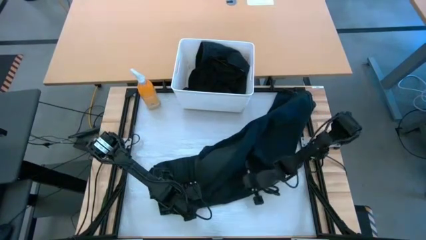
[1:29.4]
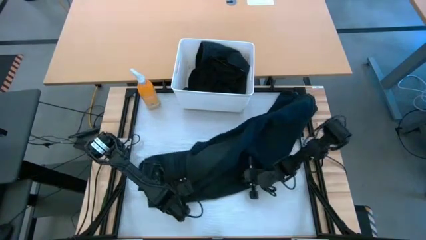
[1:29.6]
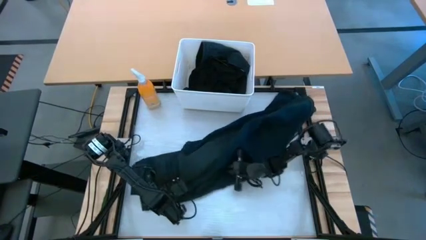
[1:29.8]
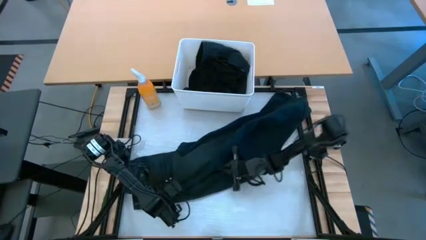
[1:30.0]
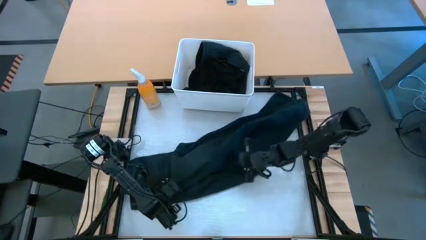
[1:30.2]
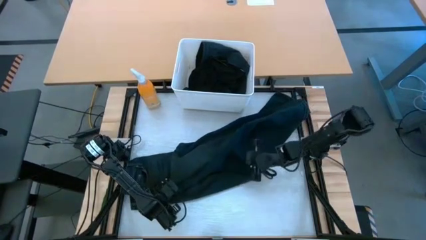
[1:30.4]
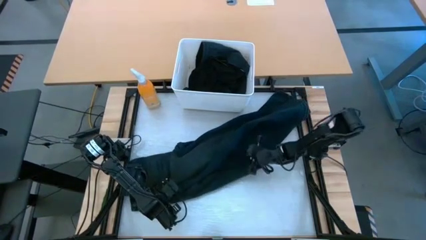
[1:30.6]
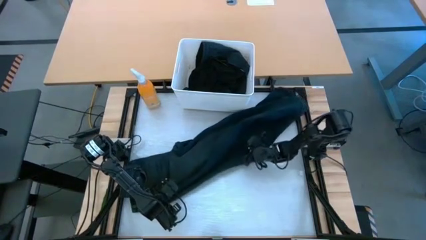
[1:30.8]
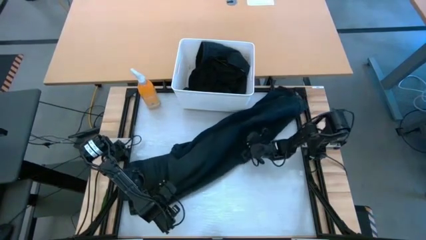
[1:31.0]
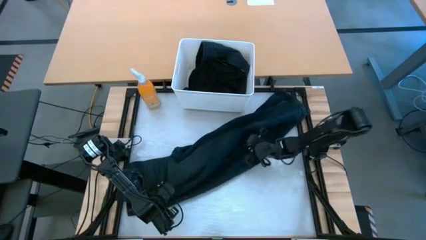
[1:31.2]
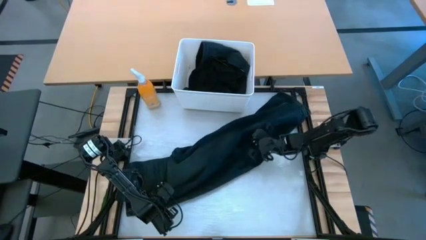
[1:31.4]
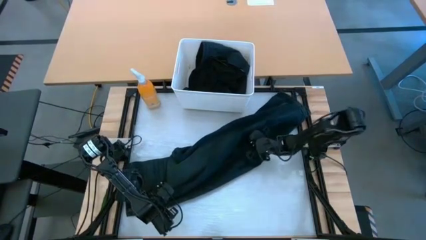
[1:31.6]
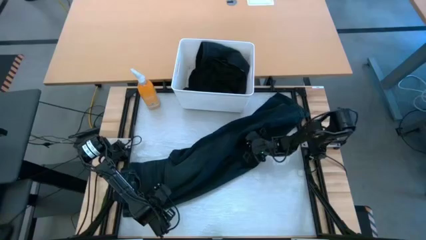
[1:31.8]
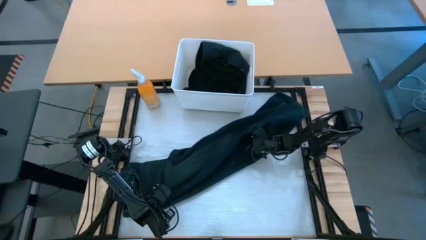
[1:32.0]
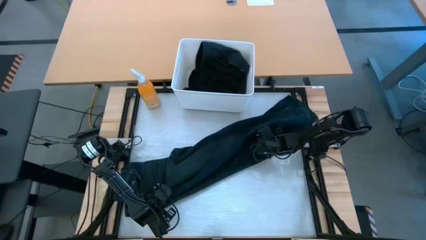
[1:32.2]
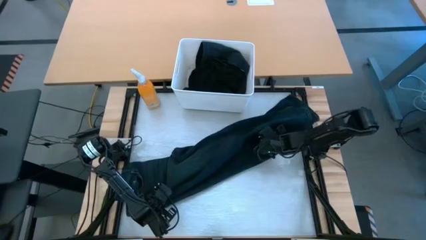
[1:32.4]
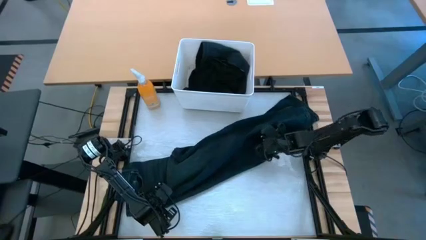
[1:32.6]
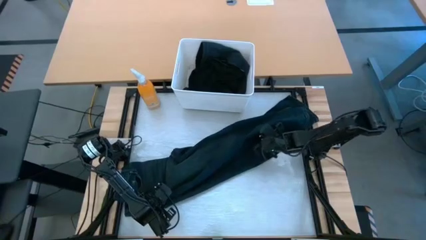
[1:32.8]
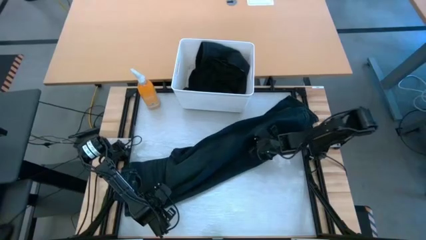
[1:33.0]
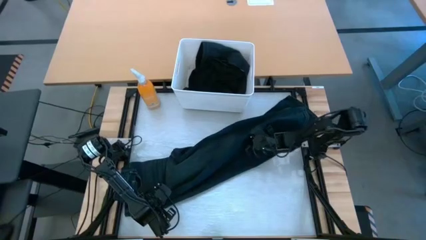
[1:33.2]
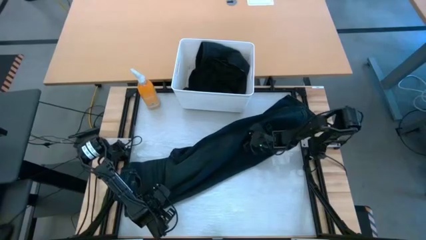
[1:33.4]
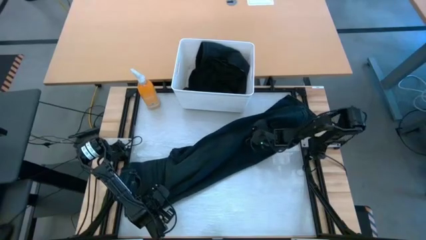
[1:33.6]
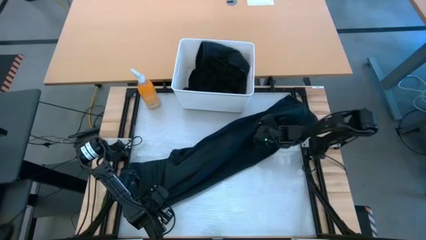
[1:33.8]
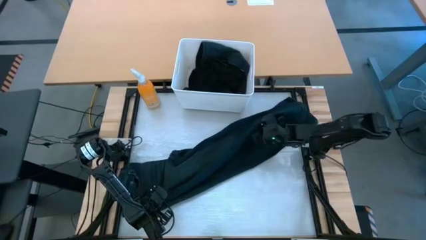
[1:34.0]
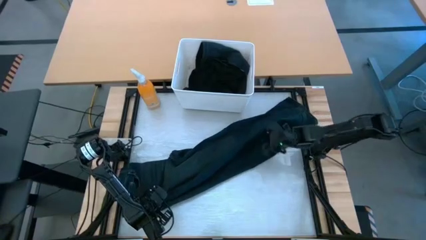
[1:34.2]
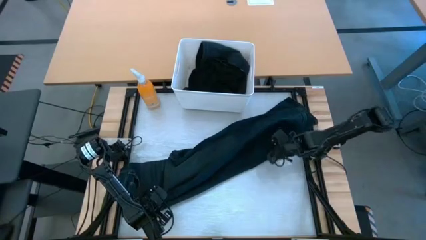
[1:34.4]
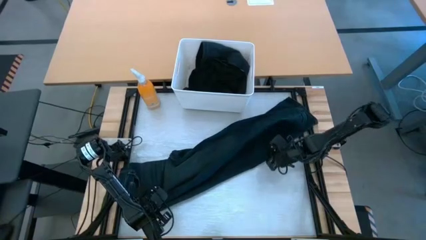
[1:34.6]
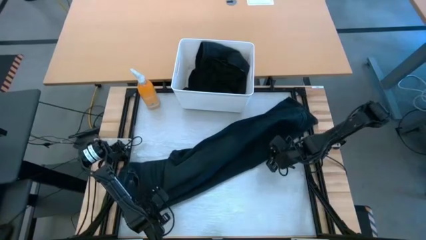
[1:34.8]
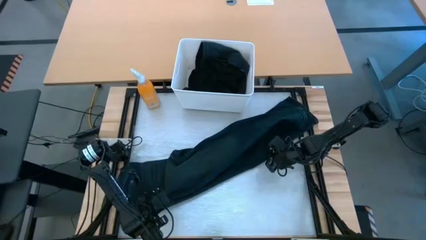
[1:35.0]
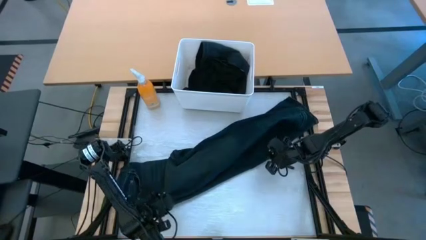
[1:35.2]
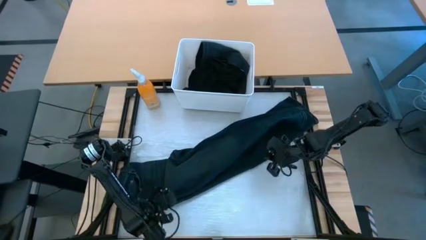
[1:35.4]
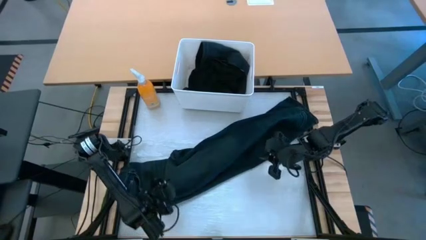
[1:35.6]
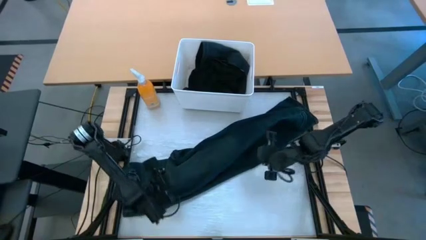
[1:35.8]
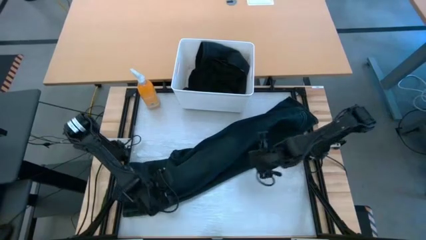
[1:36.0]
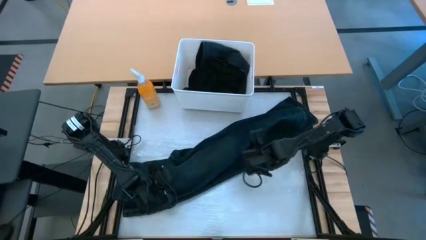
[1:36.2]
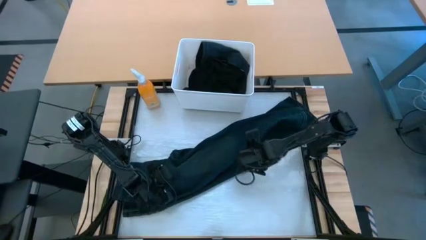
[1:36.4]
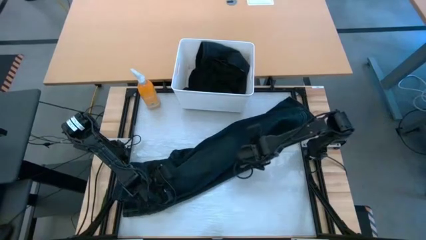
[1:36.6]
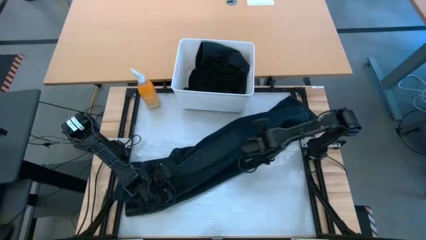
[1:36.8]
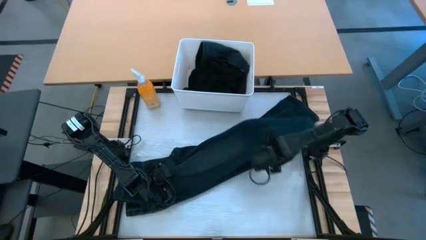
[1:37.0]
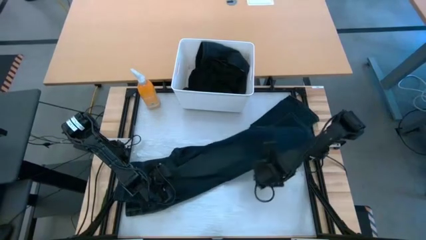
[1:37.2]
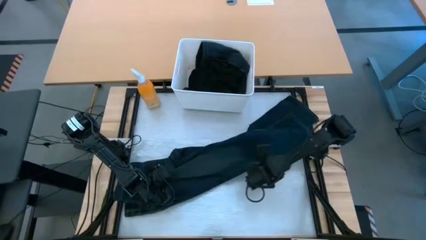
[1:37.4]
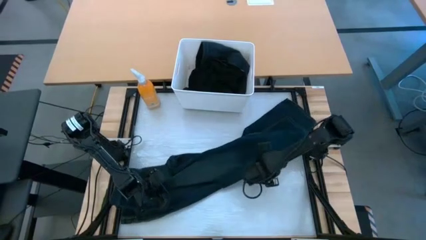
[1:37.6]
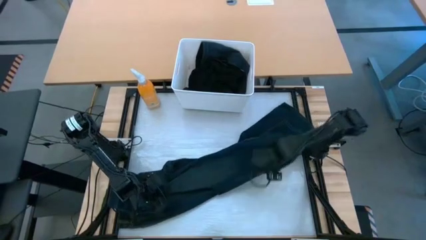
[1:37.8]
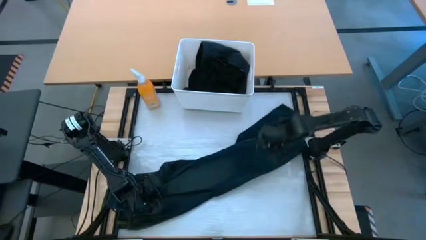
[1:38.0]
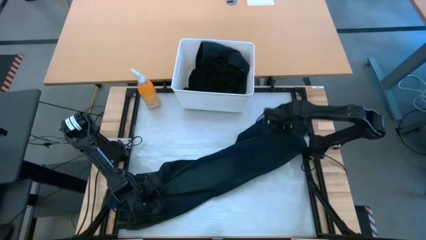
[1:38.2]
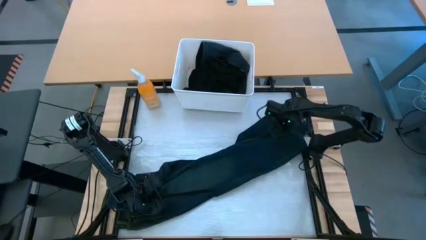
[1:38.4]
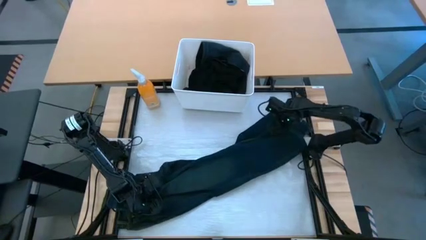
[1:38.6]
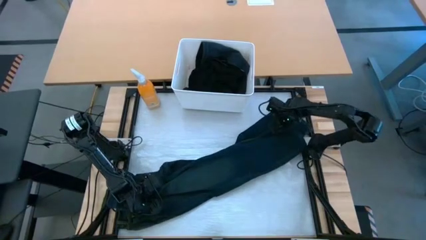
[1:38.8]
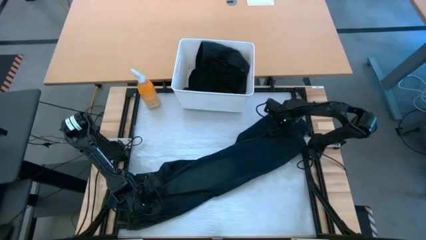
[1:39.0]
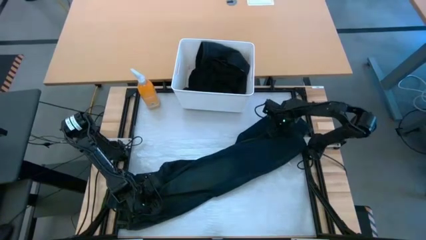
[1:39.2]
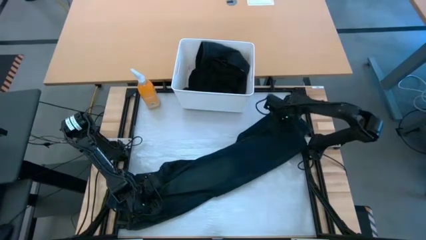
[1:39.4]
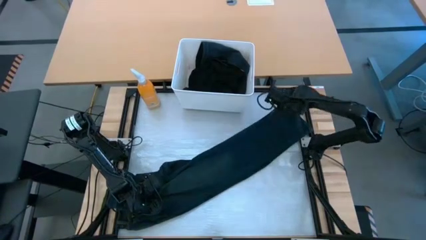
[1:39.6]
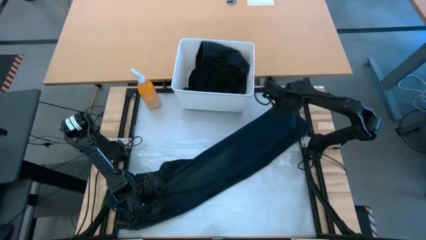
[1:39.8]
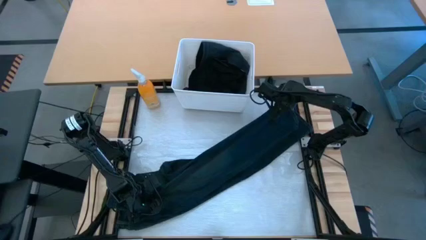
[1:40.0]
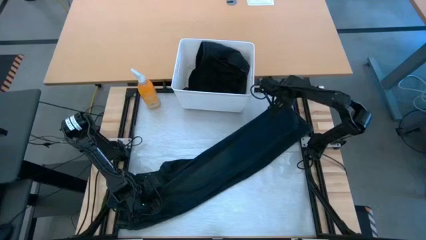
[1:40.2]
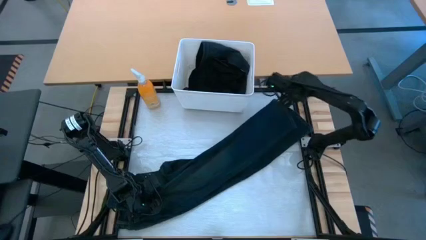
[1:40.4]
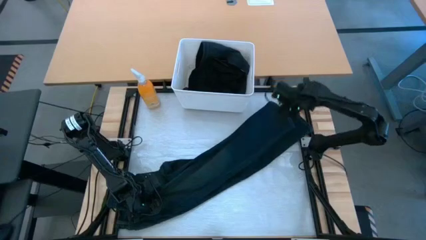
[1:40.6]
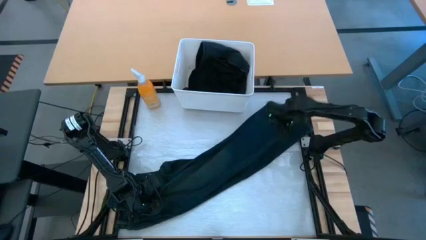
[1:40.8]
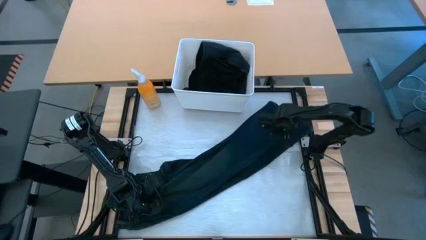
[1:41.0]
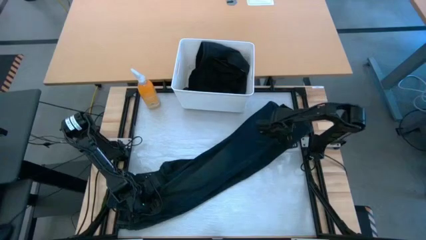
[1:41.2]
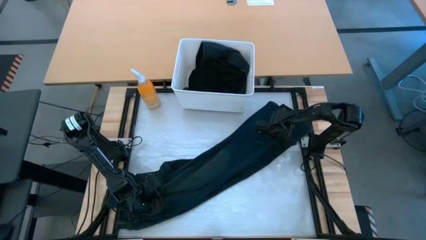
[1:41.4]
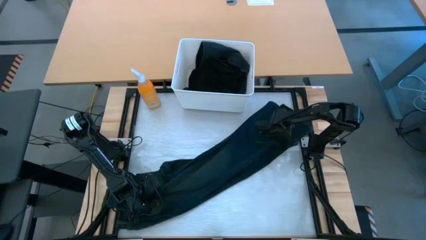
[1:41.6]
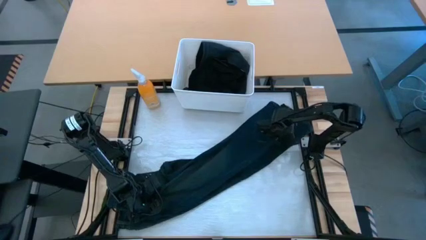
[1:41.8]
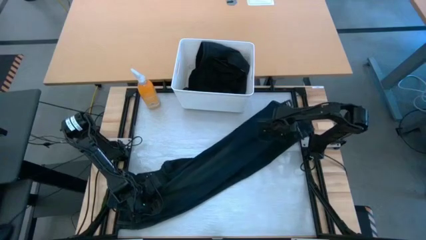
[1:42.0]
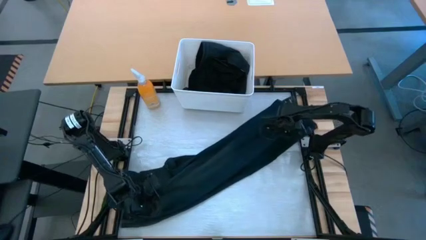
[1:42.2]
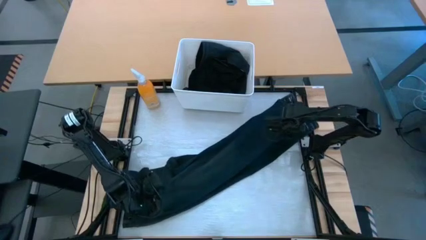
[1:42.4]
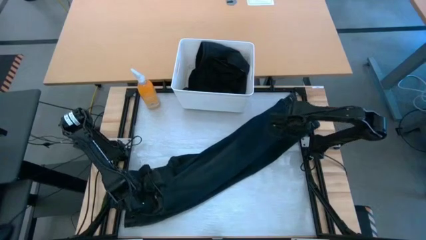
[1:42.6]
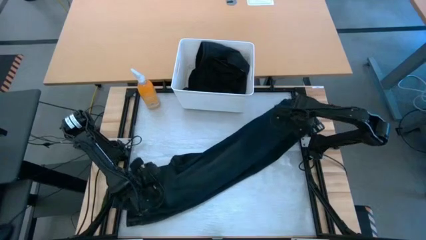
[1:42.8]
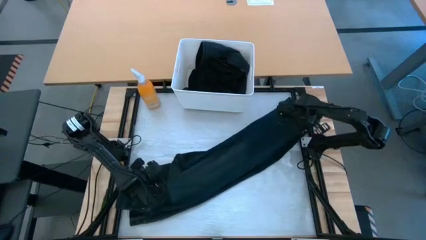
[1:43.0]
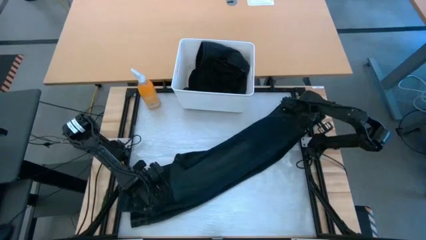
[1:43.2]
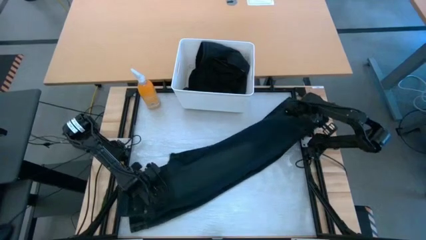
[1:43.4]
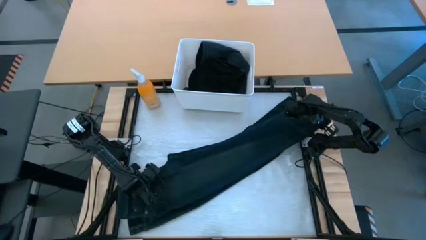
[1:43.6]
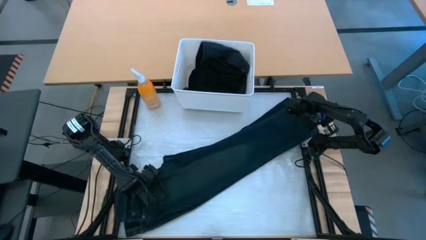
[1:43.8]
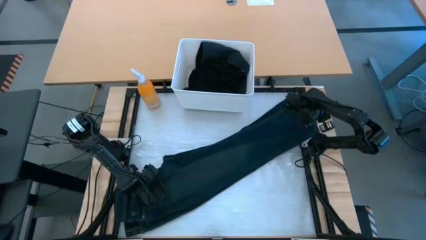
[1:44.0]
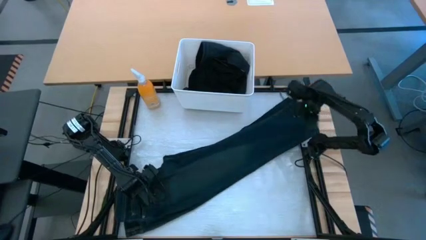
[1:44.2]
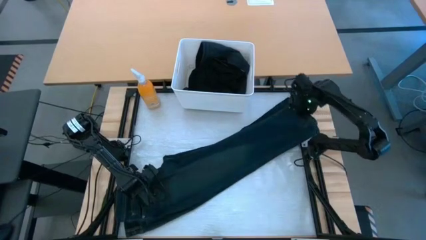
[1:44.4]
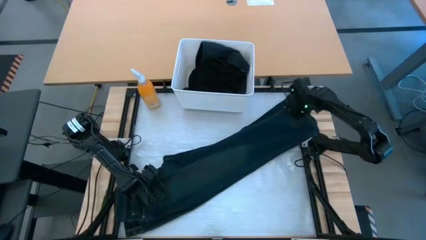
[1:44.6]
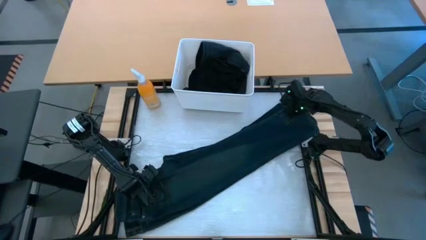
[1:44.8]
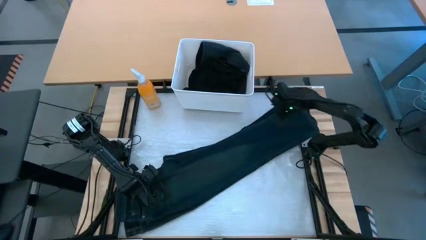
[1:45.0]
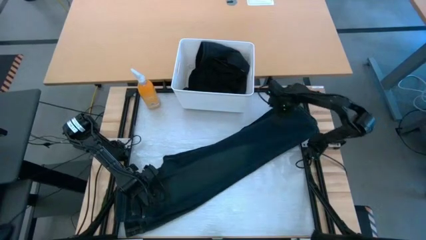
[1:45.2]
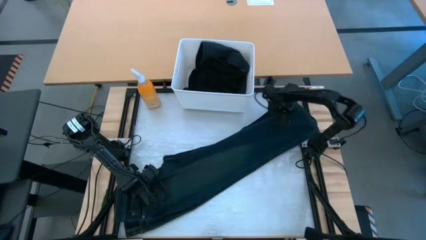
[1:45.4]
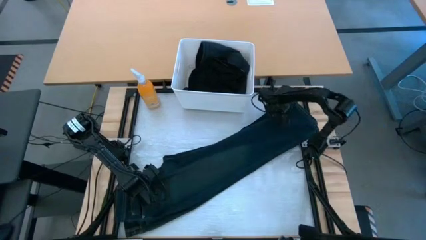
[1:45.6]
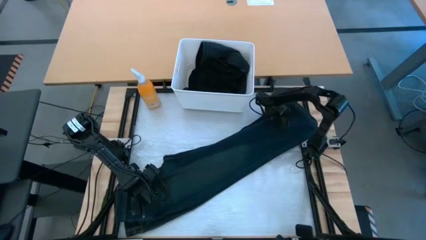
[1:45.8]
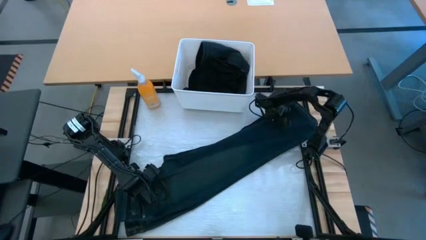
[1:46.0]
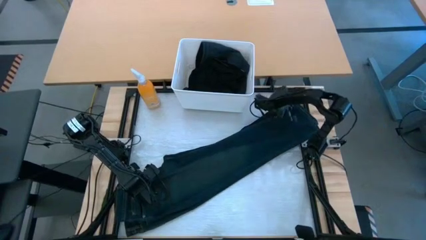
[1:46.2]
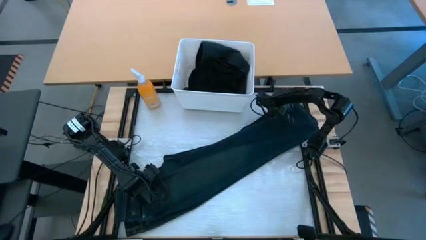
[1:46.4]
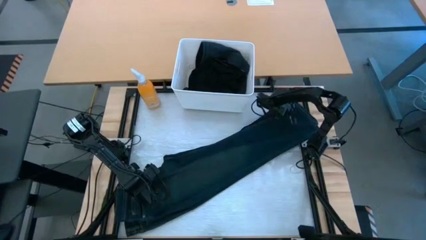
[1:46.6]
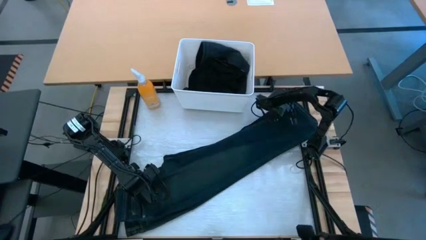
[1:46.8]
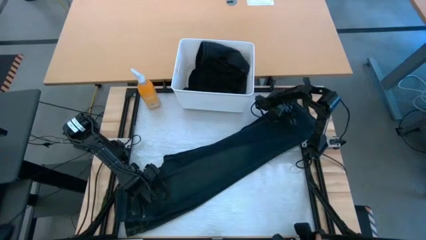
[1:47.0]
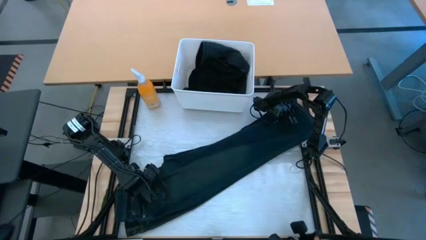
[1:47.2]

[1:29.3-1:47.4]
Task: Fold laundry
Fold the blue long pants
